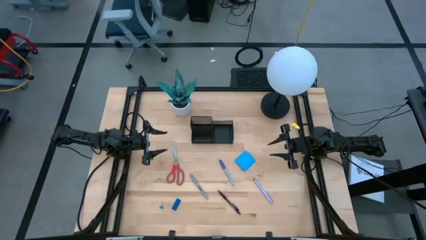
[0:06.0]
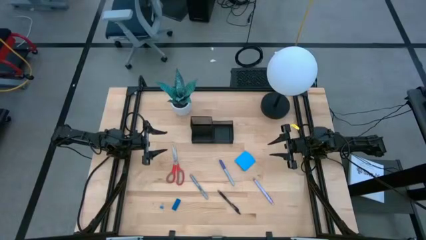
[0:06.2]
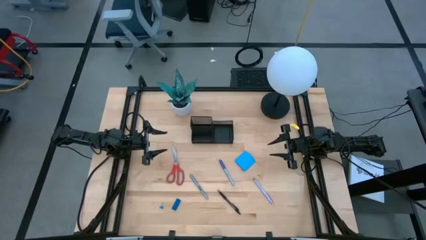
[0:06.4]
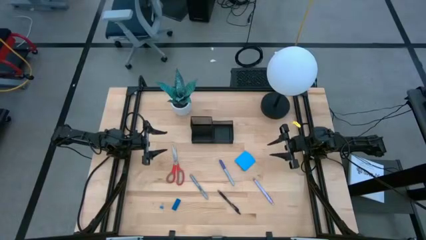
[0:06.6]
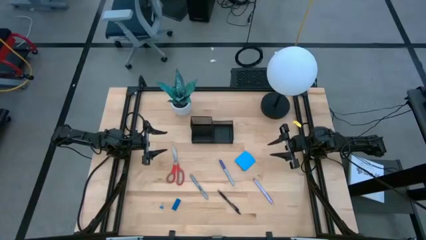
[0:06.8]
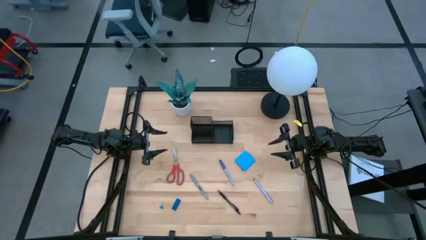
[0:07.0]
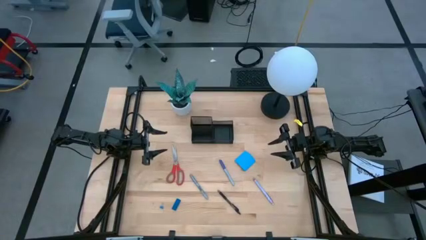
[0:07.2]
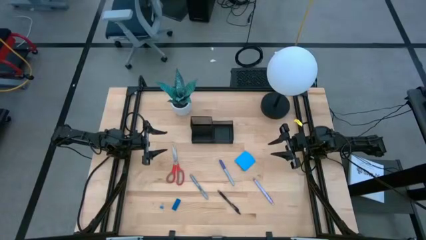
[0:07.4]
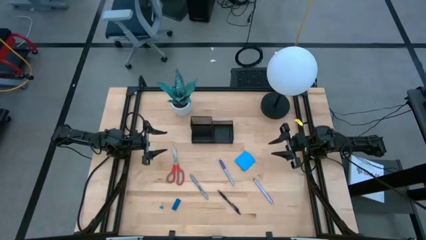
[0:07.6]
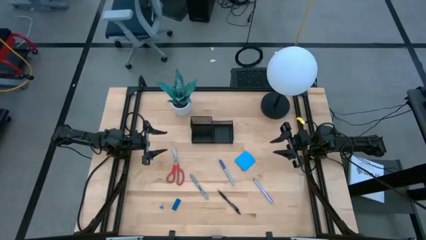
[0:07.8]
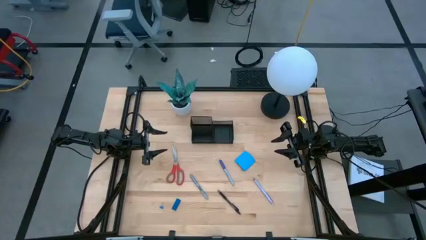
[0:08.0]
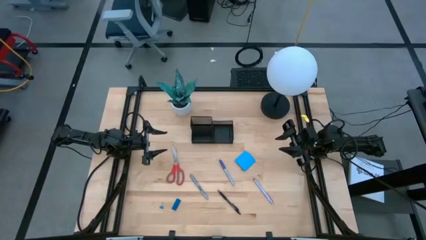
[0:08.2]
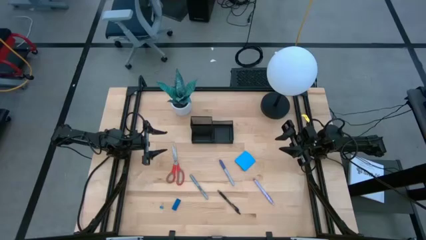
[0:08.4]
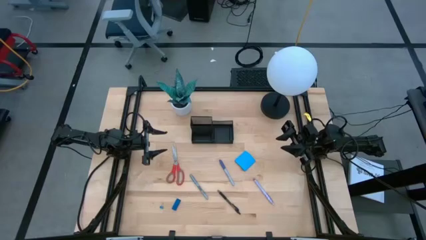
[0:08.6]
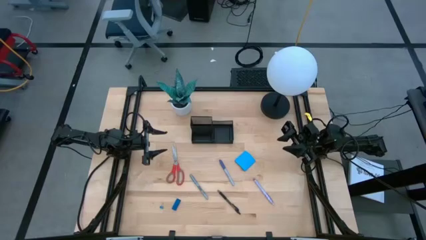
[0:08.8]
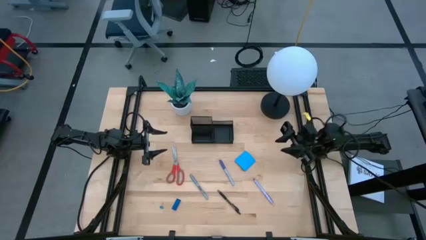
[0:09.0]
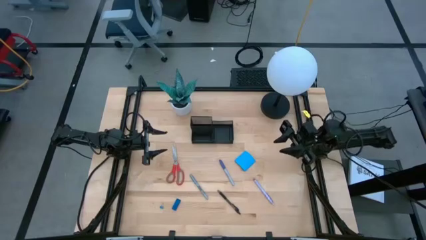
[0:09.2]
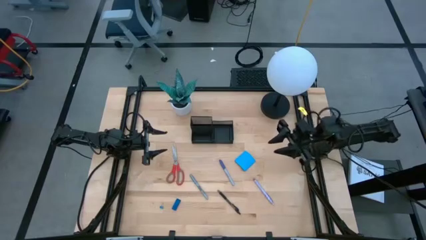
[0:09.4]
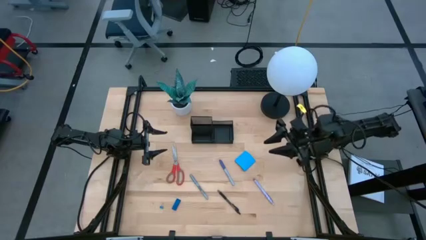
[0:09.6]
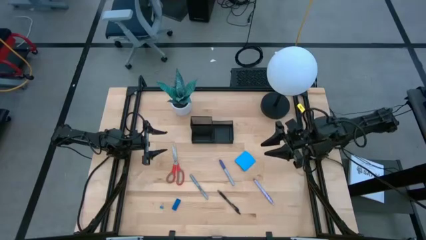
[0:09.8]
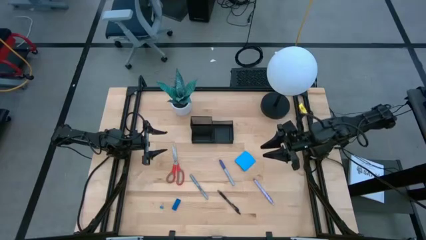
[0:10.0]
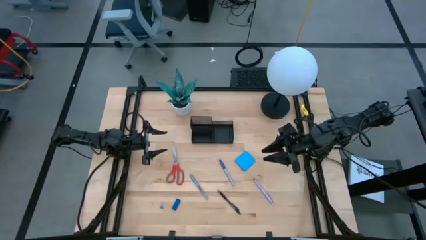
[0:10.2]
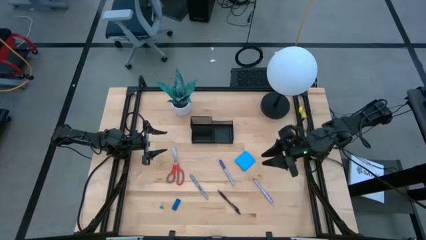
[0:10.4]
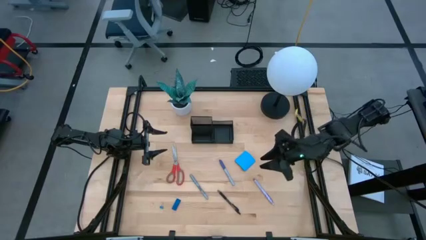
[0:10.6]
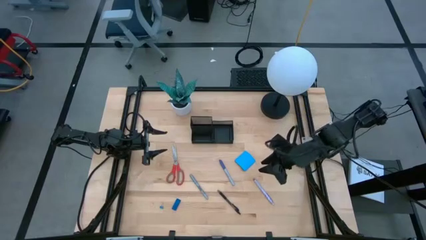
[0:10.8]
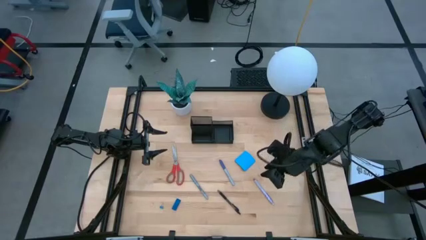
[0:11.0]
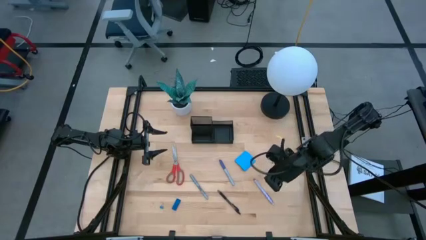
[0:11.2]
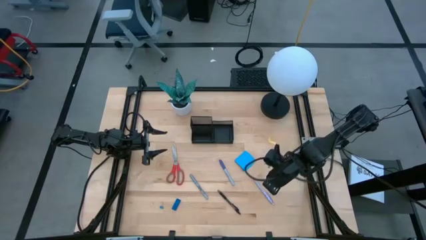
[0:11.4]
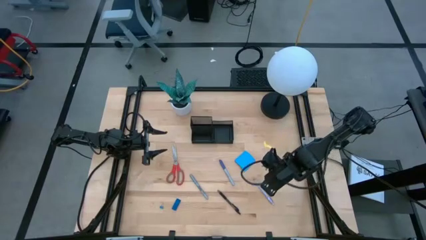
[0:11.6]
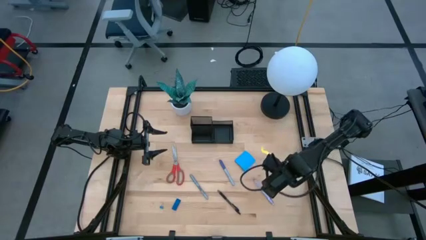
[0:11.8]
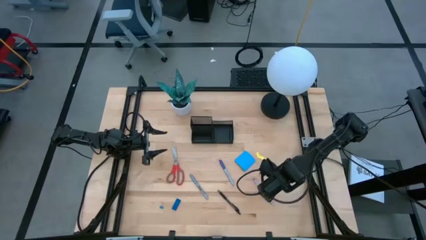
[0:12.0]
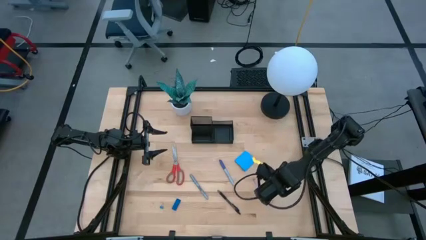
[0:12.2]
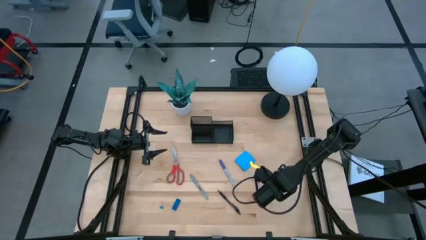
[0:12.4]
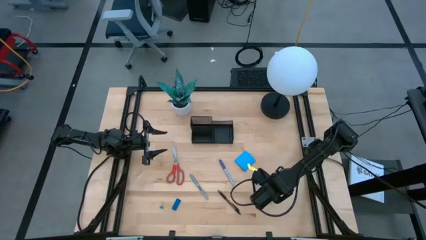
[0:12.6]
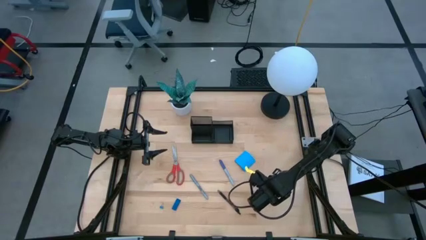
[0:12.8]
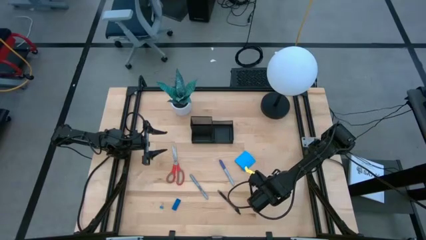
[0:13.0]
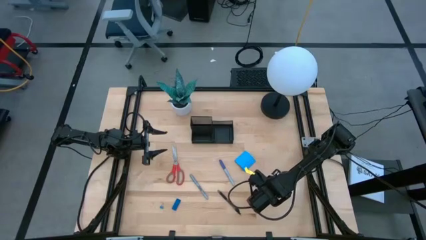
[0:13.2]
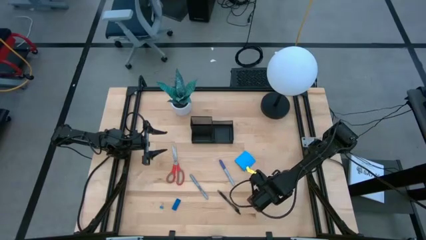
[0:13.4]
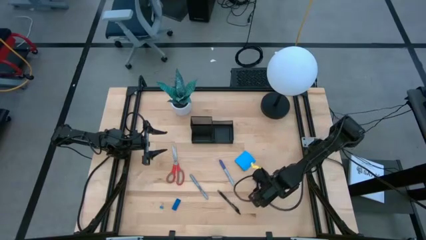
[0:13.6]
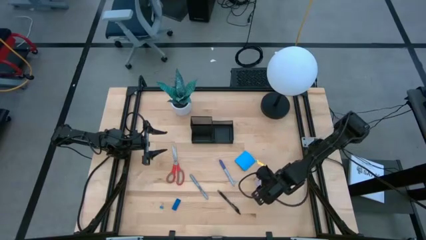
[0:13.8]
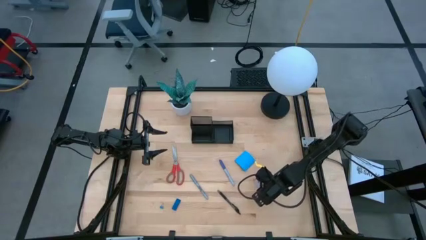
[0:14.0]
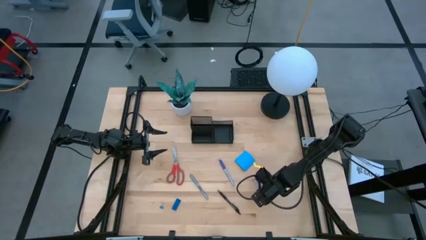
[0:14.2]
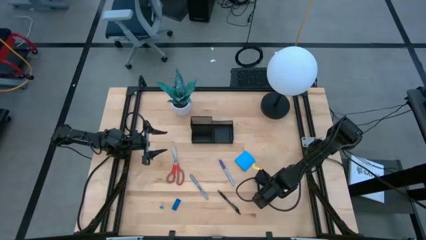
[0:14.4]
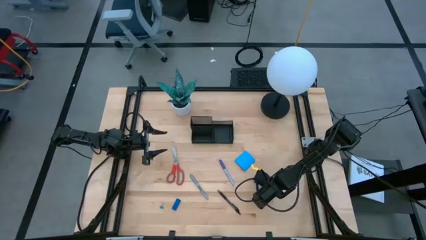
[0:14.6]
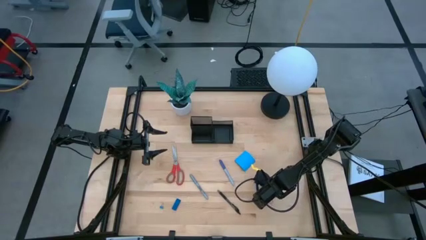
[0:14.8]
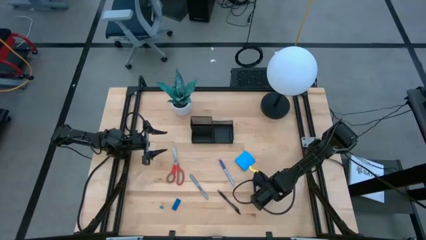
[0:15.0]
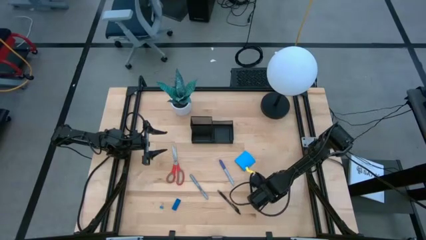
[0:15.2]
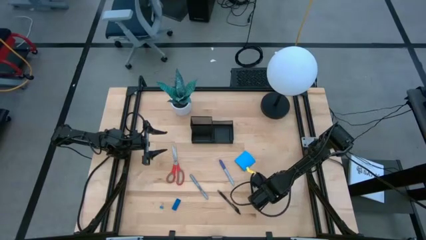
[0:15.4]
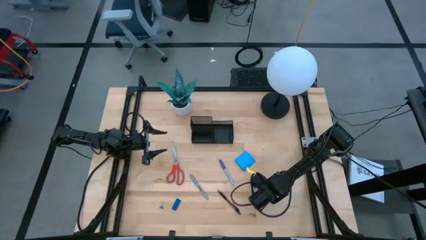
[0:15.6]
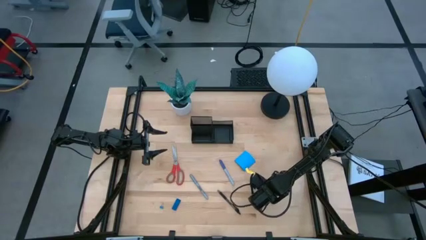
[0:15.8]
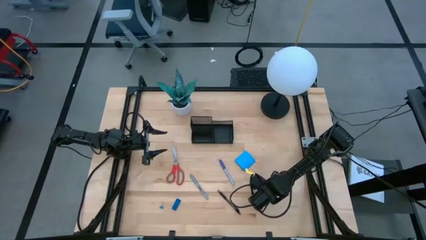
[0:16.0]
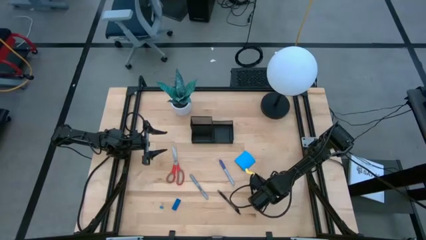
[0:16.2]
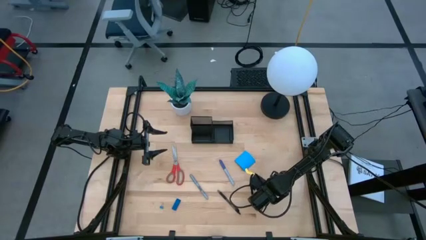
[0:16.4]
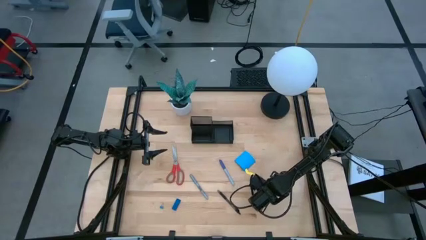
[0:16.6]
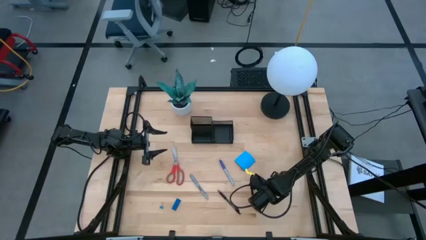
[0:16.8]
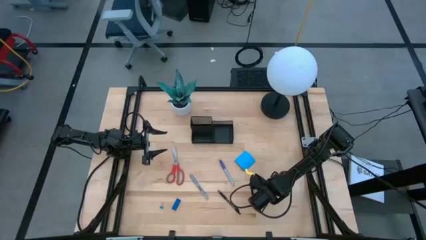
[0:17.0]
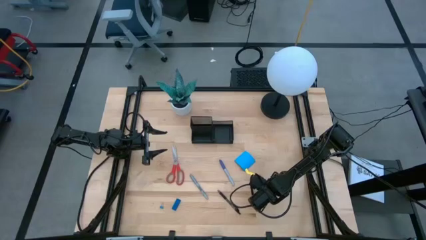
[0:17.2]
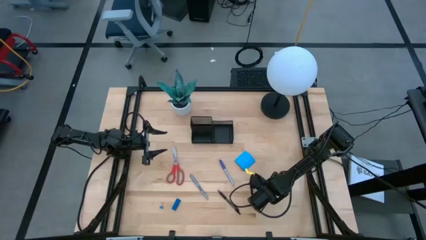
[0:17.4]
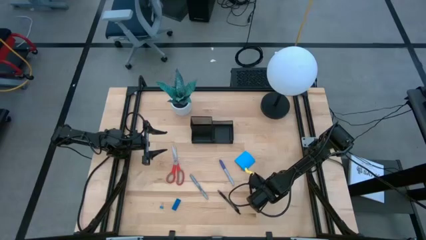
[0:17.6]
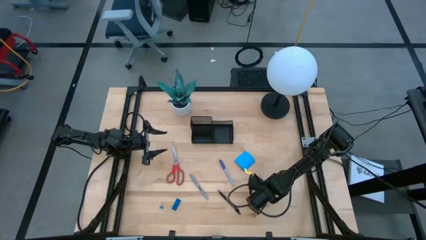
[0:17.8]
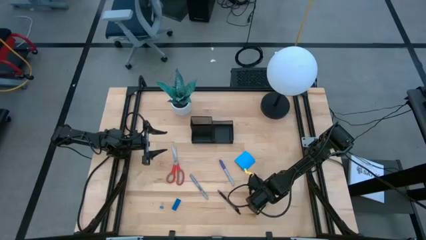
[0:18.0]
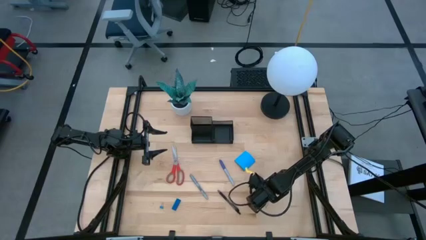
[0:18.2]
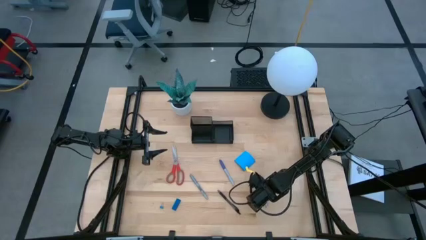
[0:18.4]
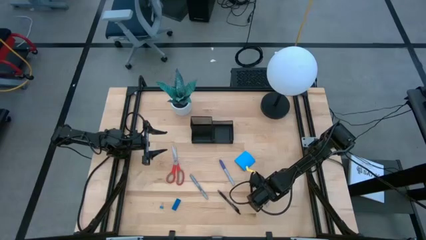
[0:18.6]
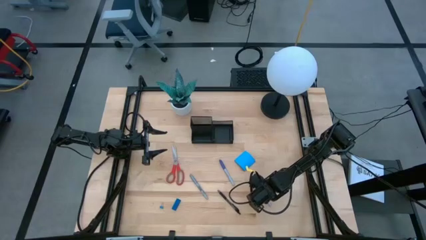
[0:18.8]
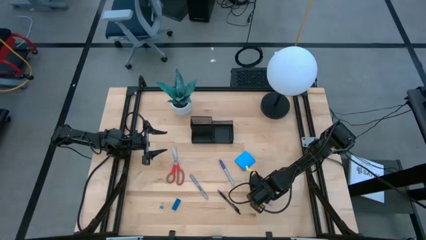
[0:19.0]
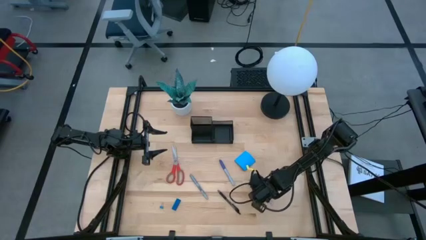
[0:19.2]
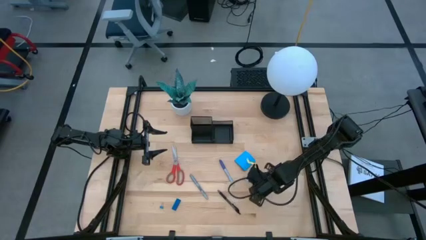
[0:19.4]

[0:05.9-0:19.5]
Task: Pick and place office supplies into organizer
Put the purple pen into the black desk organizer

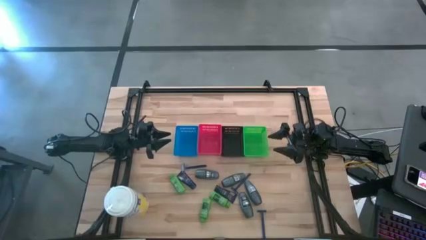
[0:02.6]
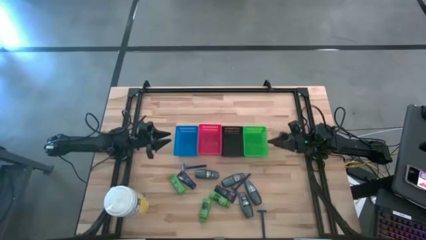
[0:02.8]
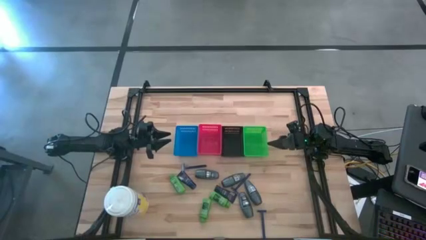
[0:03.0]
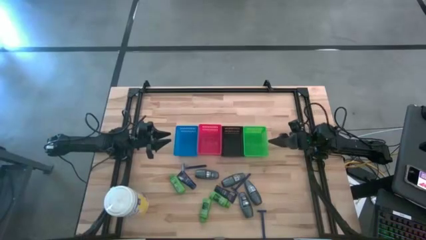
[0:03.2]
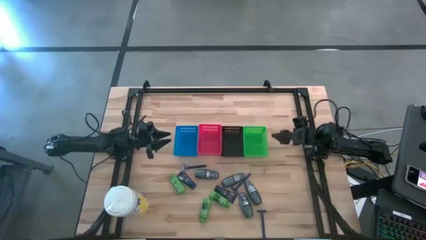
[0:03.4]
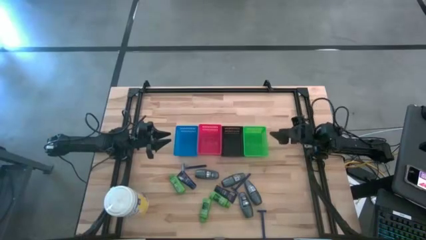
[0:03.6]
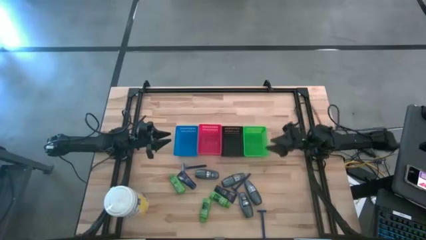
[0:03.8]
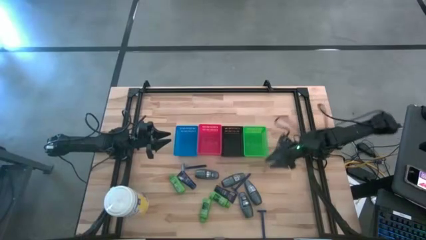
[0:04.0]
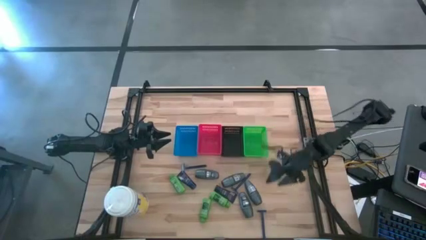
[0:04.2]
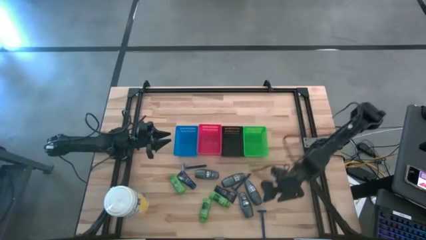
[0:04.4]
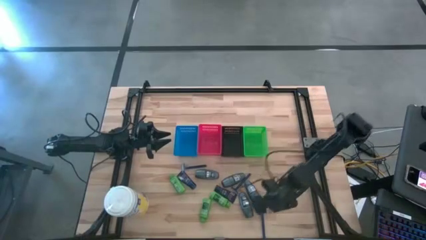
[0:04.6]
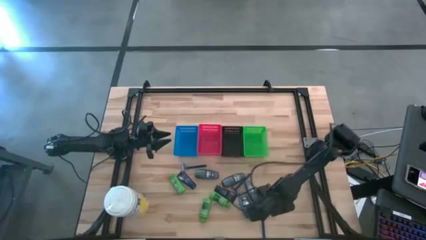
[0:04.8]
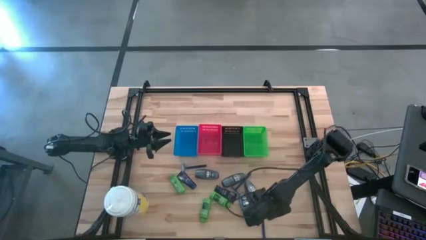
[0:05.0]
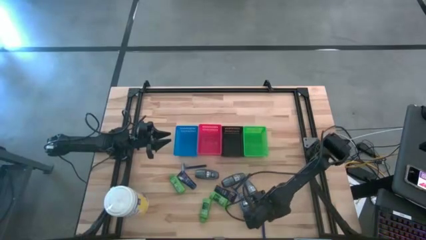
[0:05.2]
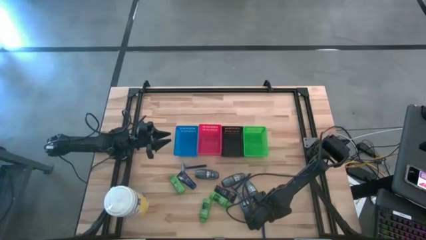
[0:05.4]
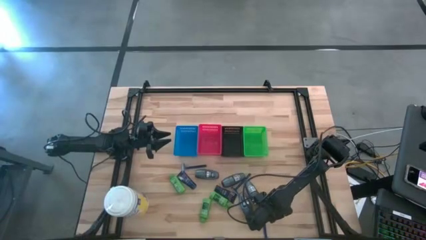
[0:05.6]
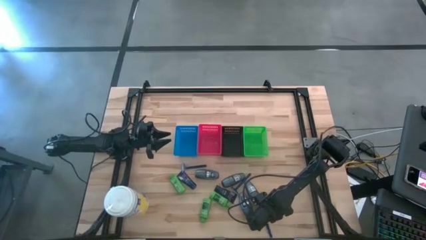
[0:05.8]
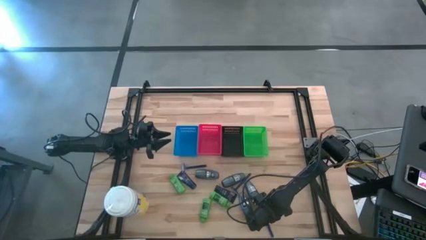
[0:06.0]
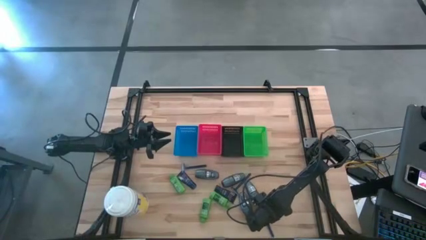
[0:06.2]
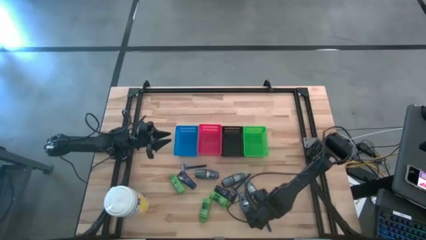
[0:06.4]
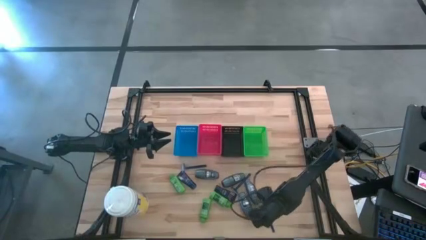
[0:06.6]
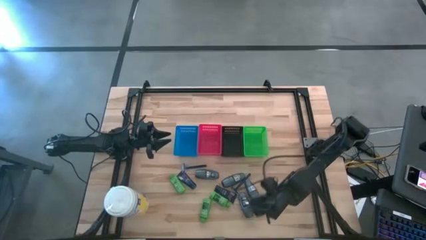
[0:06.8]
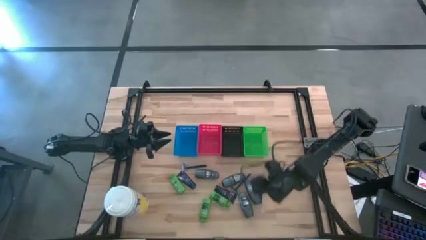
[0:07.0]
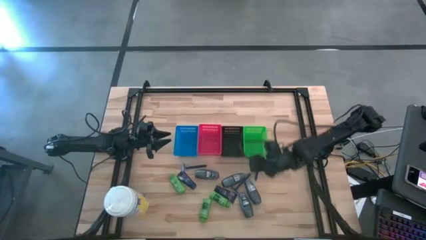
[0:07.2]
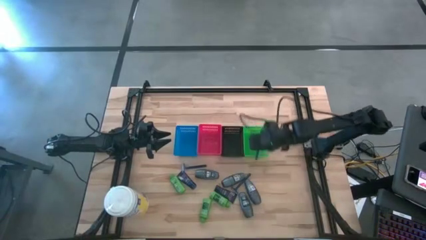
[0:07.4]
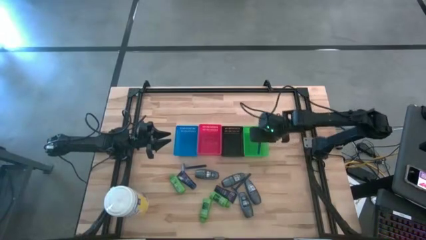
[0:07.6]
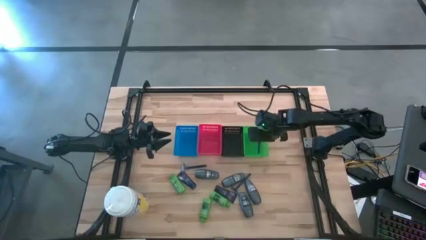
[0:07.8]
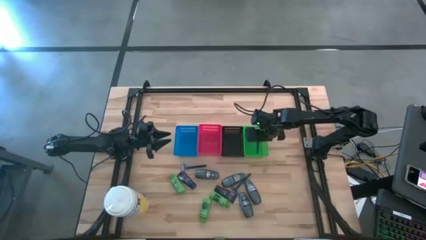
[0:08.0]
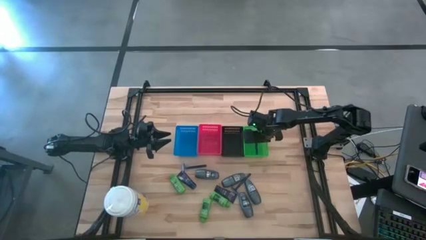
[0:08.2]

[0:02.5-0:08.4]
Task: Pick & Place Travel size toiletries
Put the razor into the green basket
